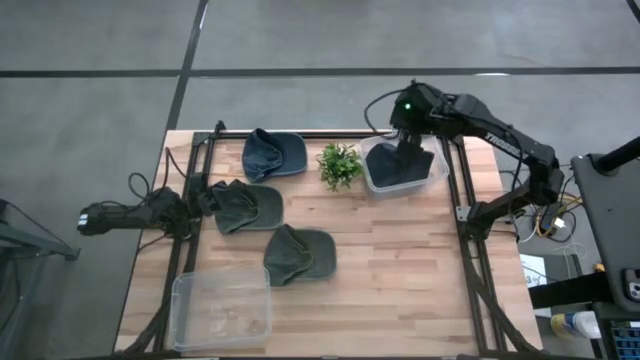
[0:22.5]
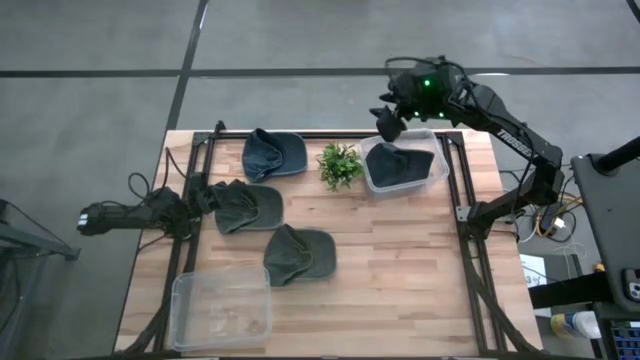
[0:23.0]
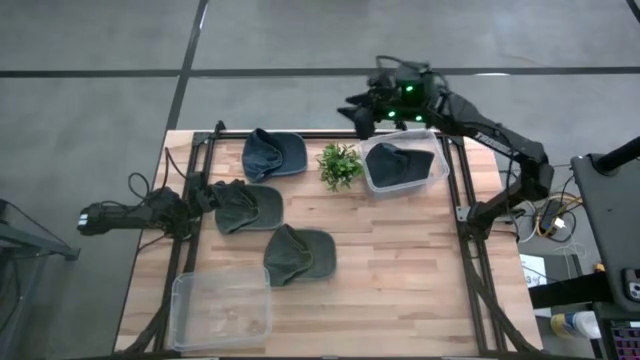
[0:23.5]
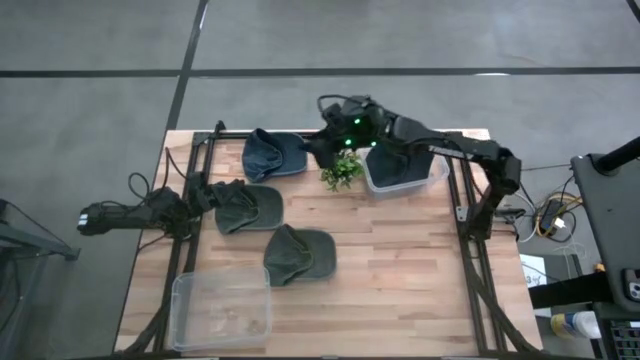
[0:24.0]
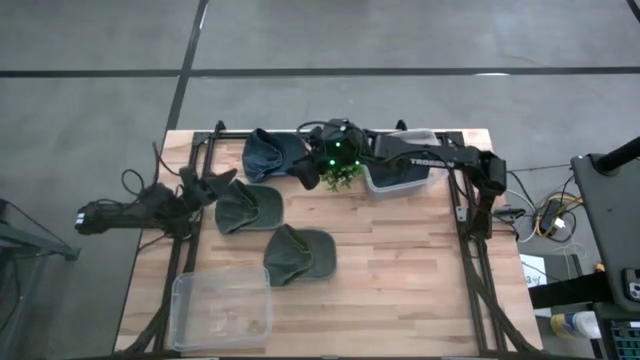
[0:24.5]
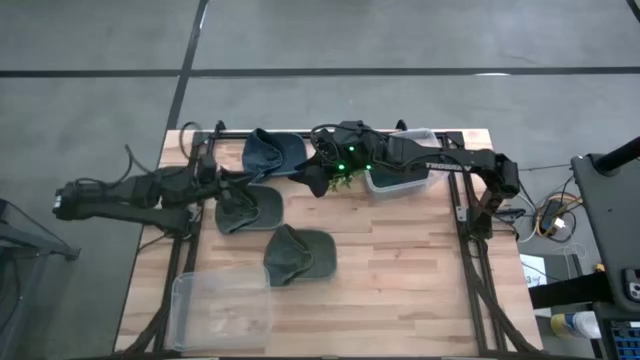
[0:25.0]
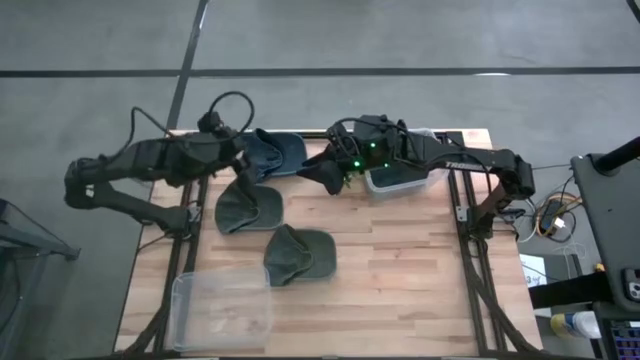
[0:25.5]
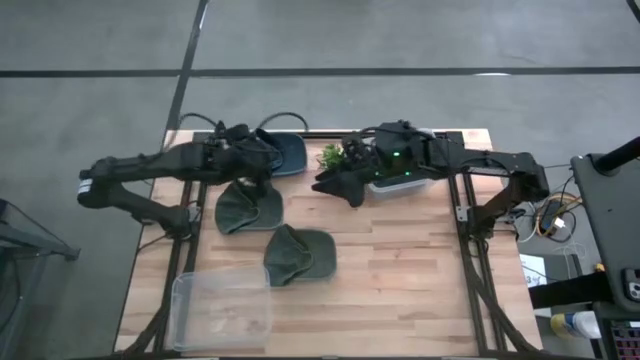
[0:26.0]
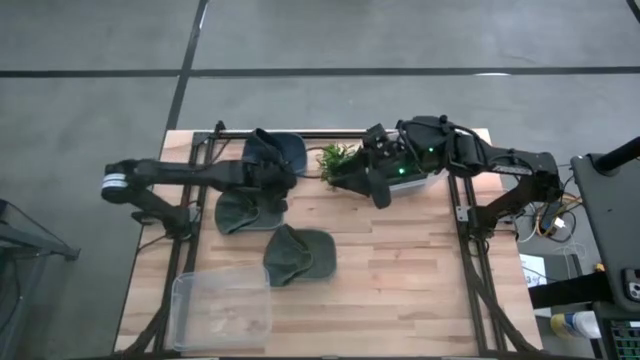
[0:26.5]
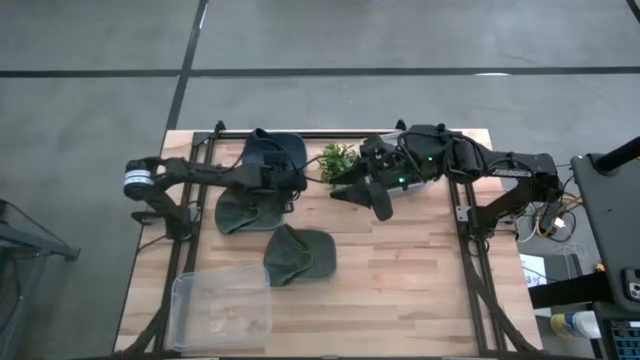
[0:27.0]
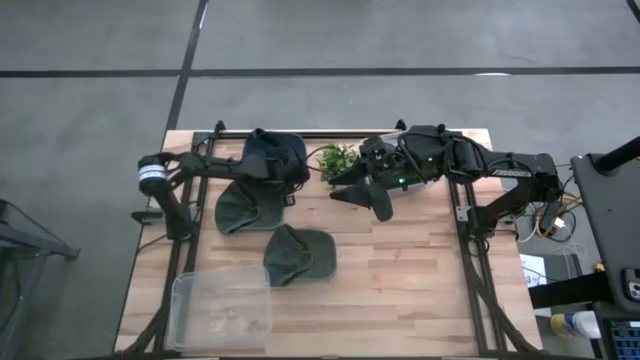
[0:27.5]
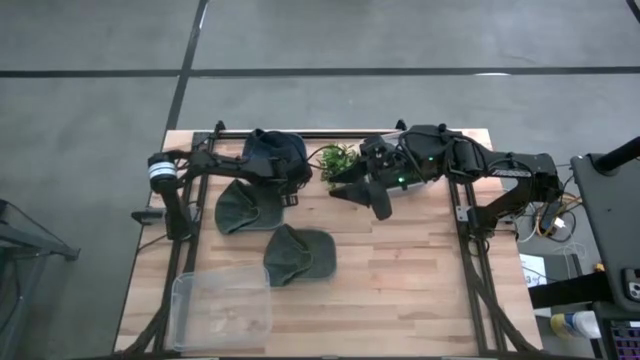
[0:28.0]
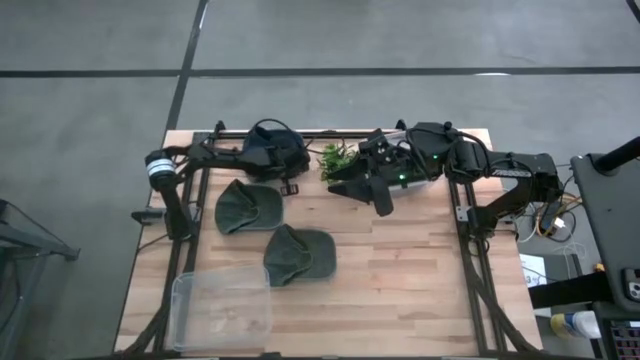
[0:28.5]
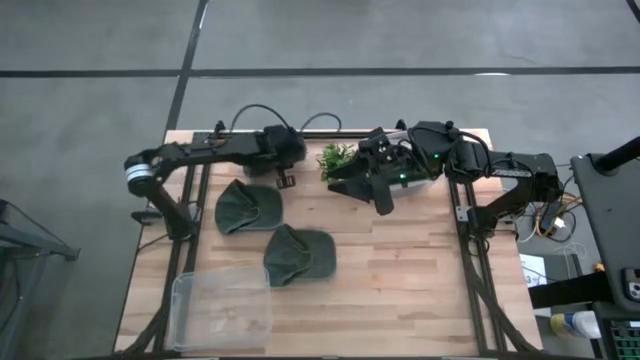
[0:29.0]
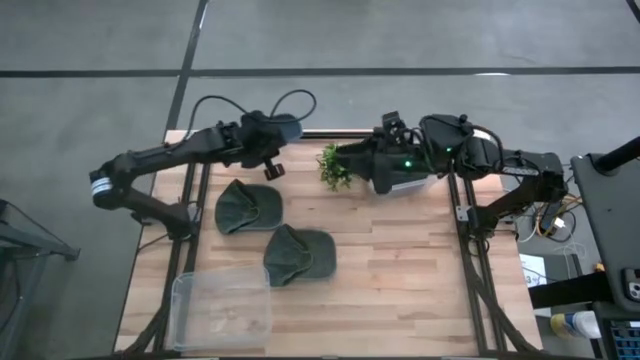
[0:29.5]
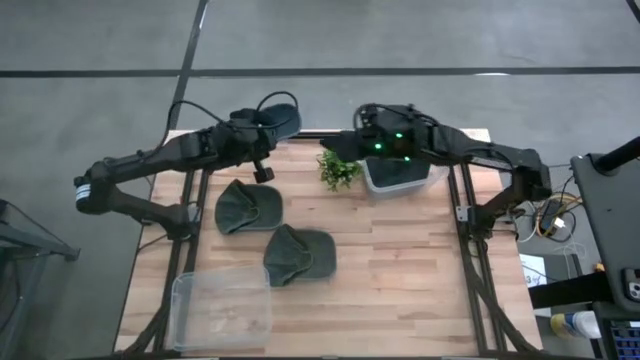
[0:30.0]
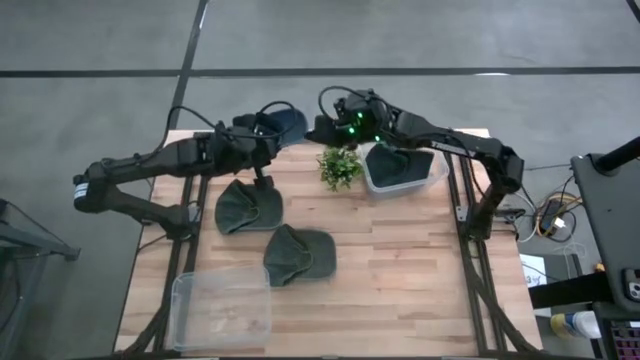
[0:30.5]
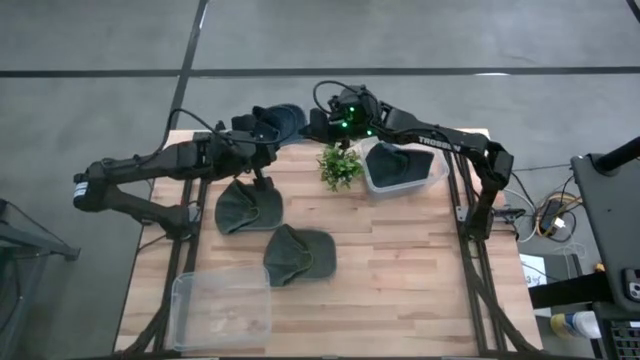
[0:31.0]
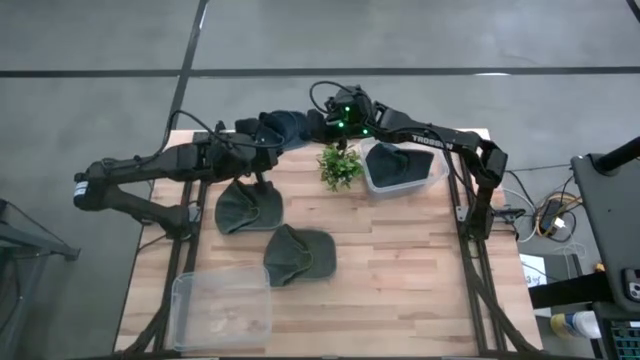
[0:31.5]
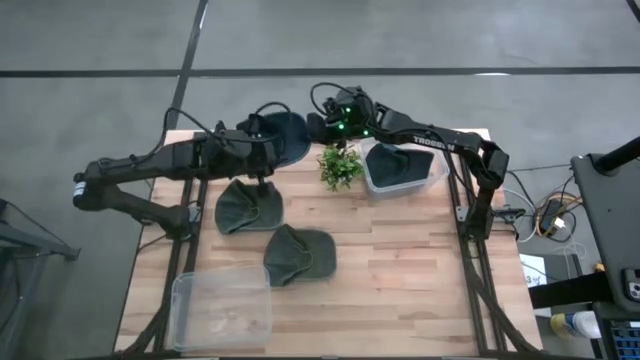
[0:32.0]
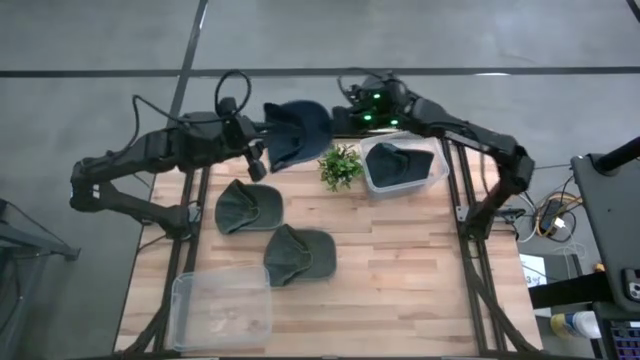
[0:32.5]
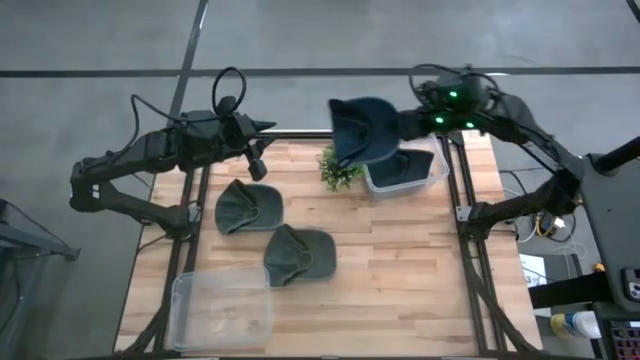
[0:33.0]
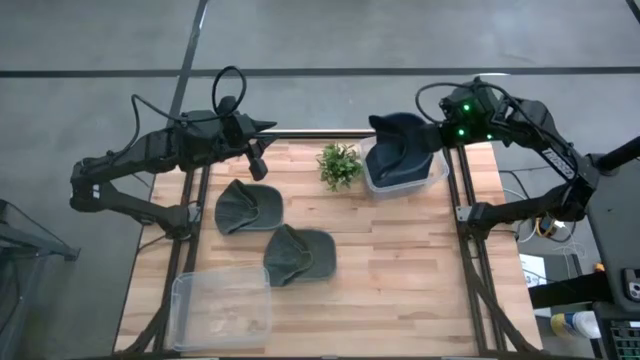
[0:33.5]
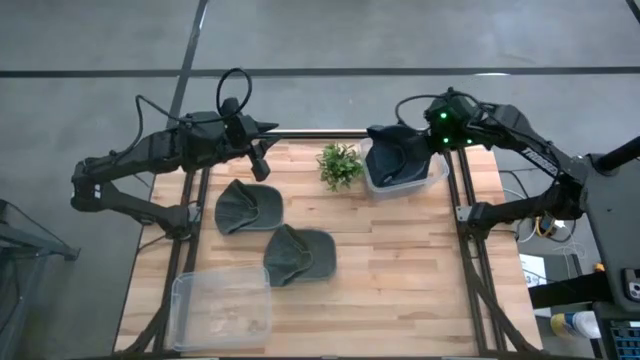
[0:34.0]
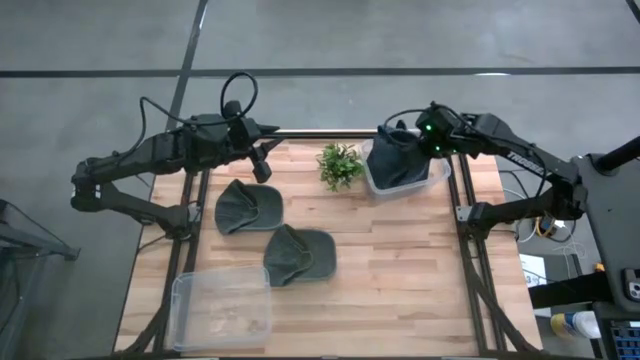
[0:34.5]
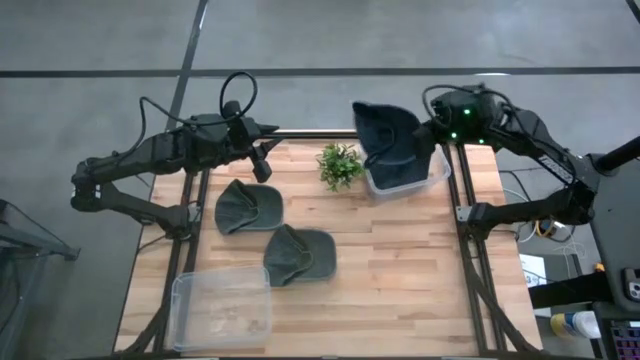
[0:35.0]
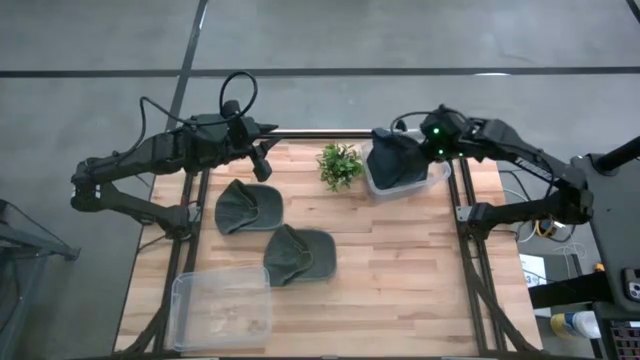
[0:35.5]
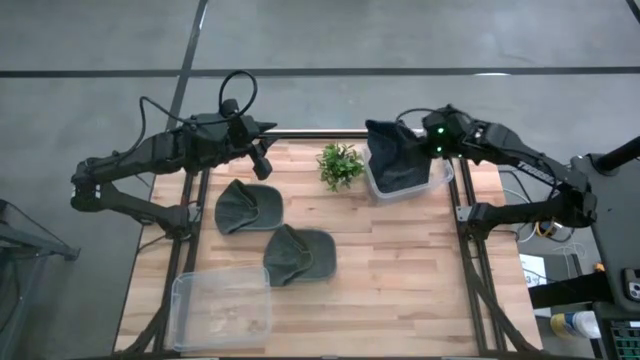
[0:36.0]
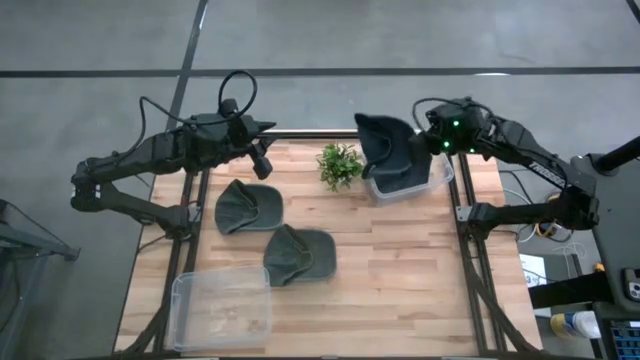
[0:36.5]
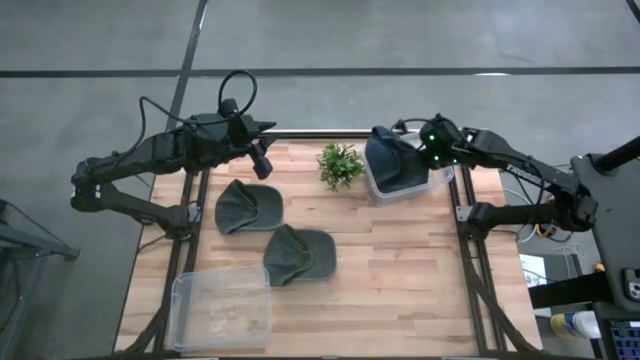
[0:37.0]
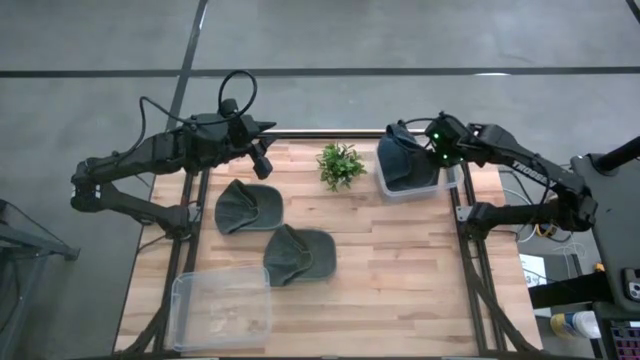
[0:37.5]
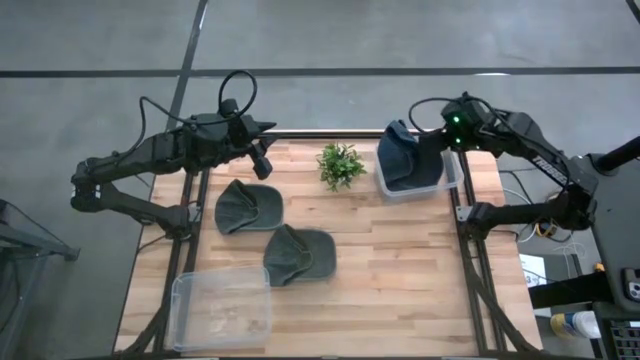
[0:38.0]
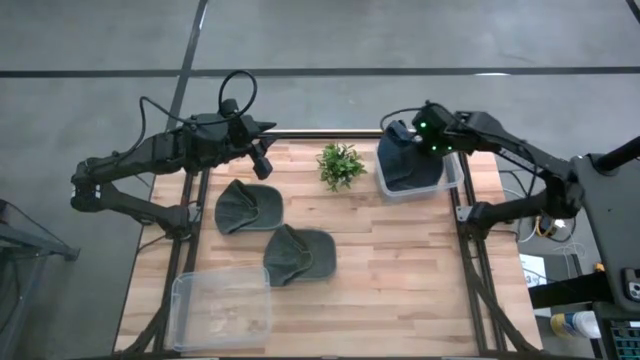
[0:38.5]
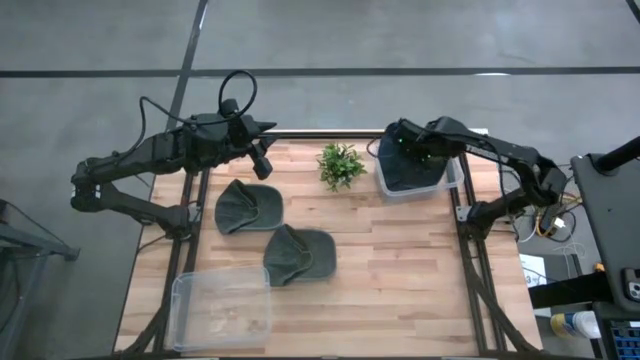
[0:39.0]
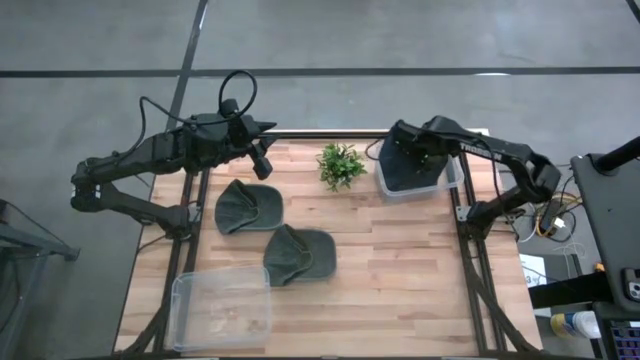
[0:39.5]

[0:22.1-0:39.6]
Task: Pick & Place hat
Put the blue cap into the top transparent bin

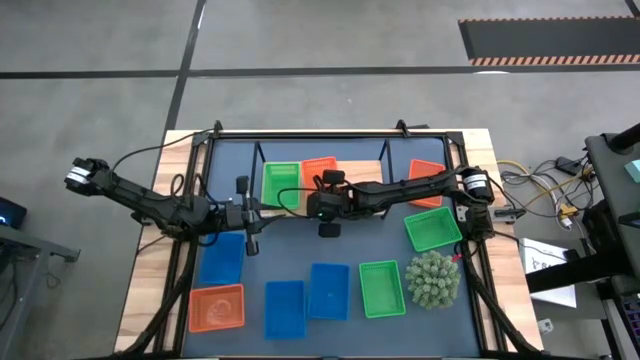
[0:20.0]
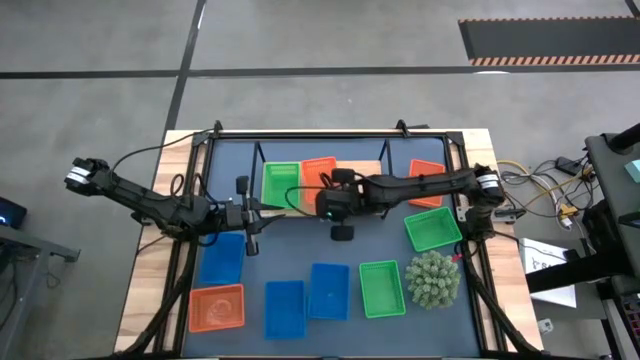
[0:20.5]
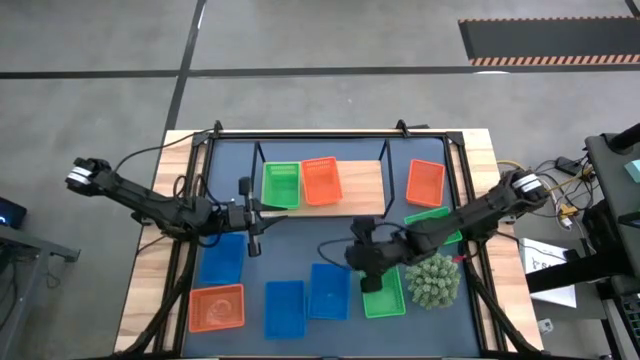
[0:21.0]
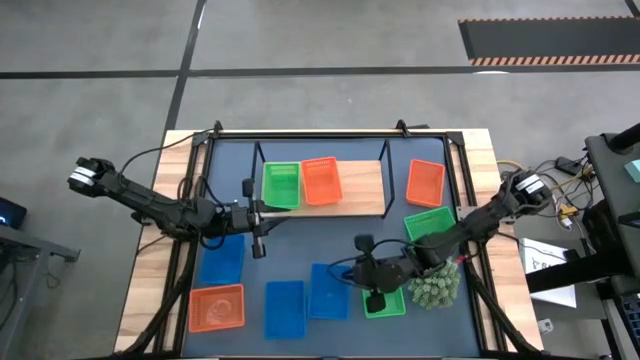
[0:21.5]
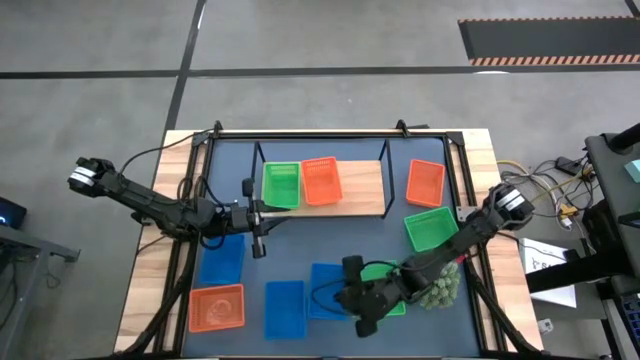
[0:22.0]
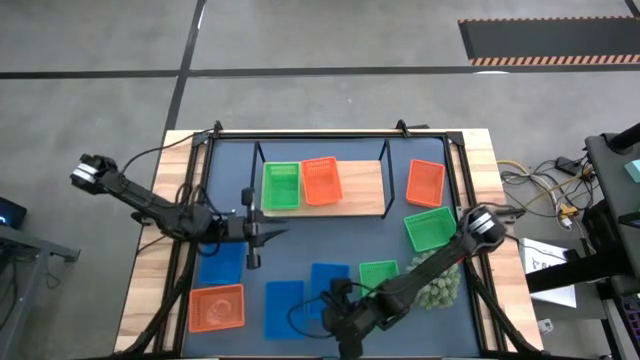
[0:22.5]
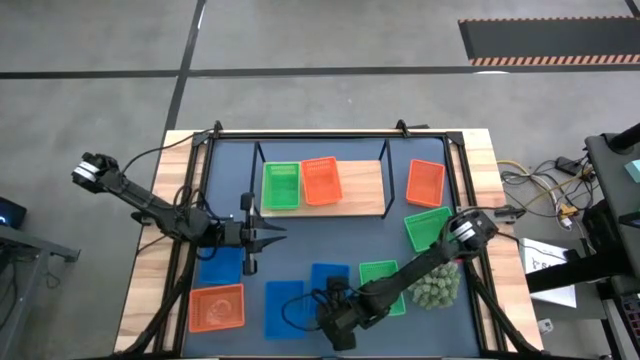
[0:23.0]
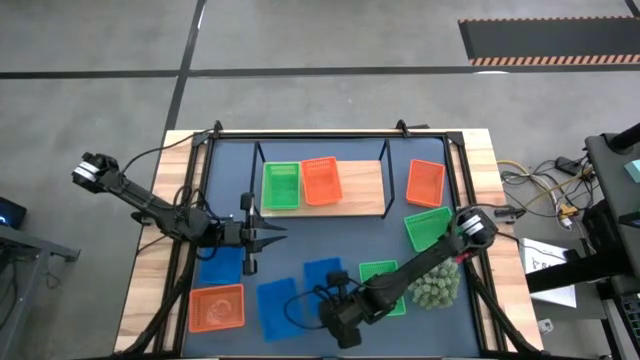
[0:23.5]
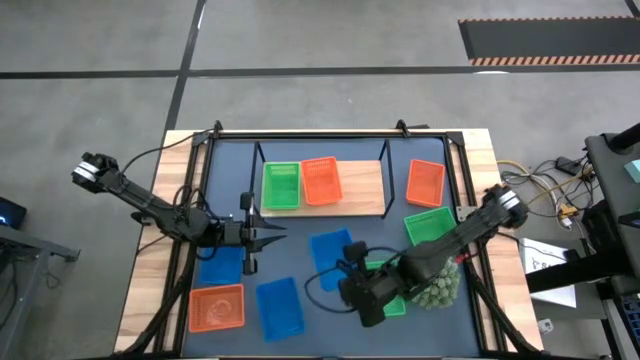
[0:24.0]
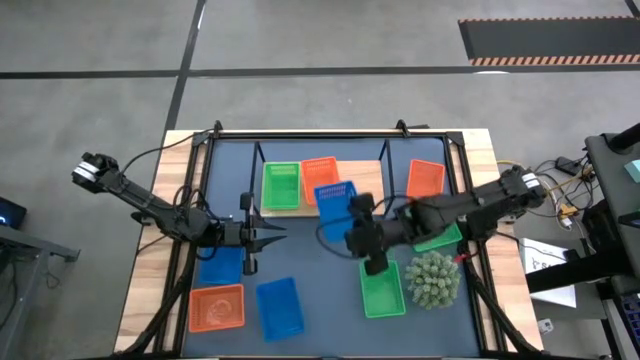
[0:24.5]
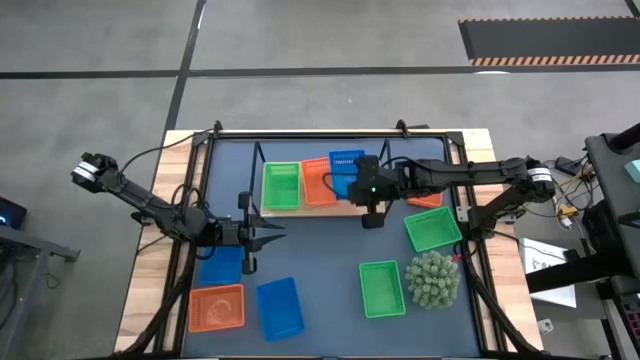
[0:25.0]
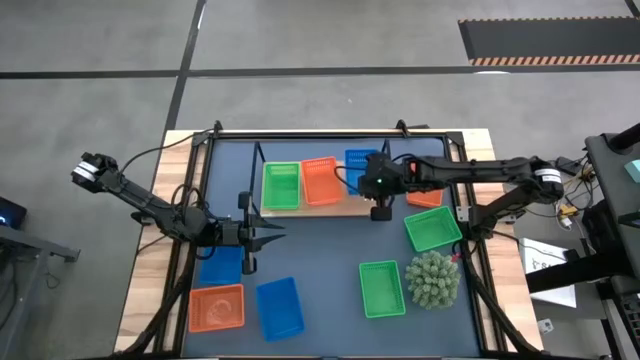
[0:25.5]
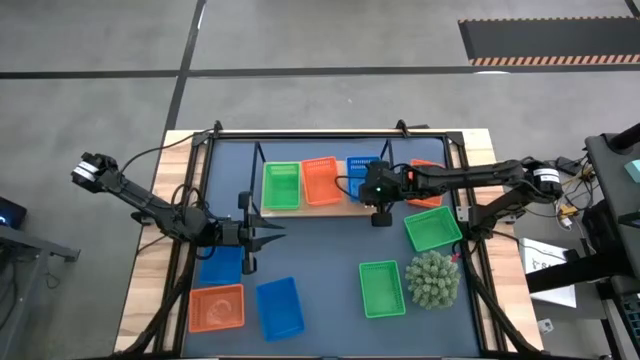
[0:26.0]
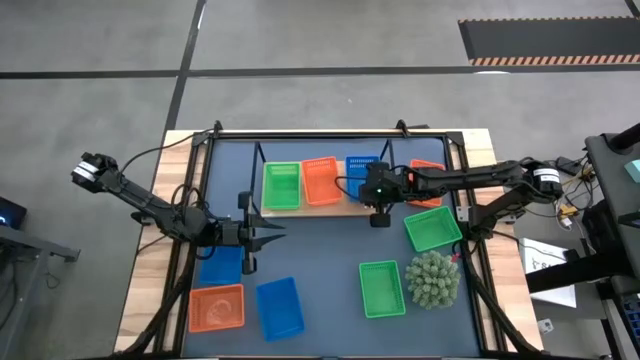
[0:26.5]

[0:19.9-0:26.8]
Task: Stack baskets on shelf by color
Put the bottom right blue basket on the shelf
